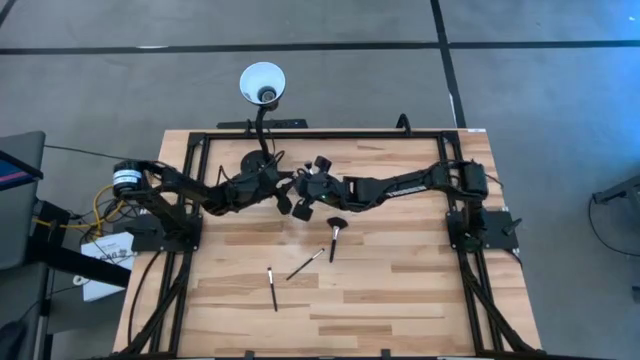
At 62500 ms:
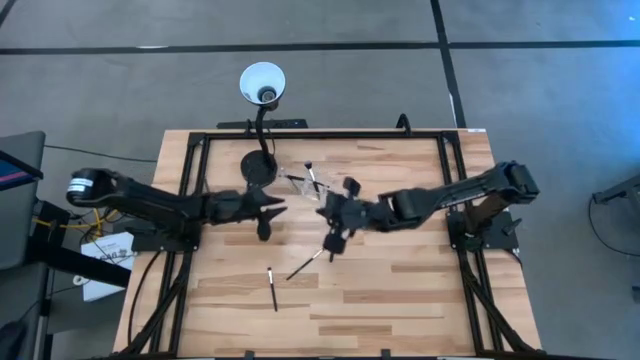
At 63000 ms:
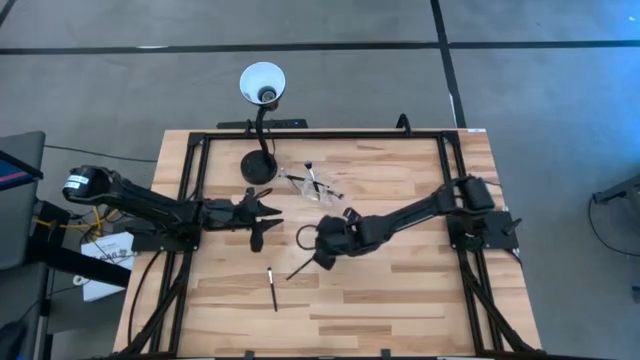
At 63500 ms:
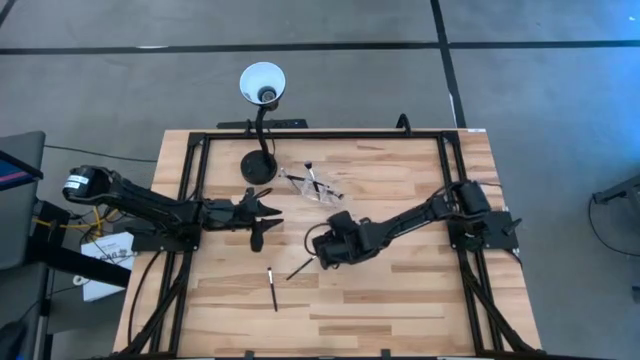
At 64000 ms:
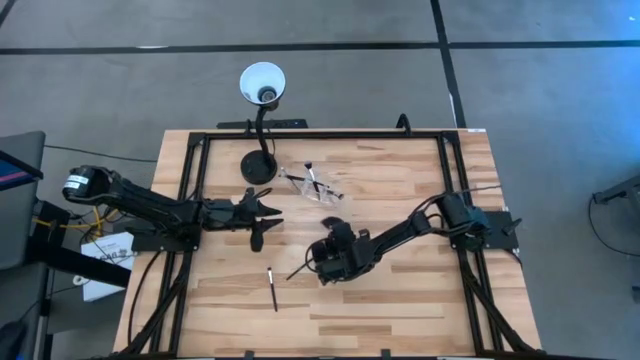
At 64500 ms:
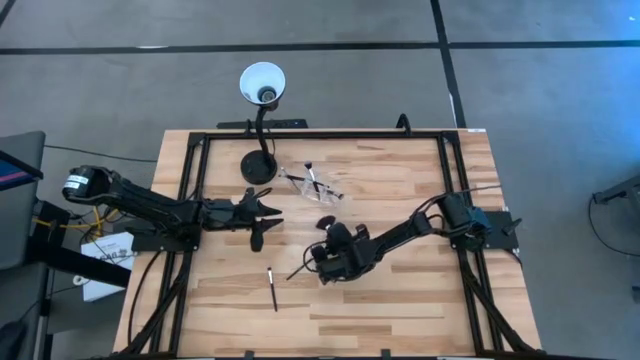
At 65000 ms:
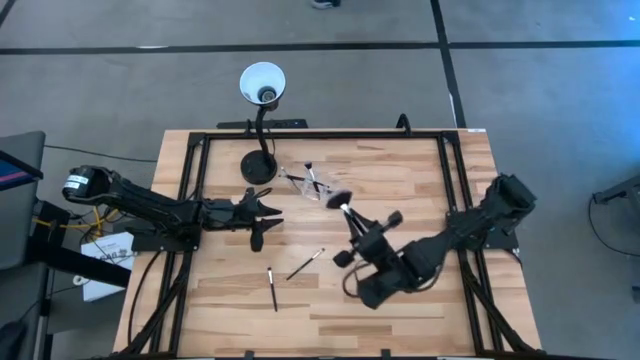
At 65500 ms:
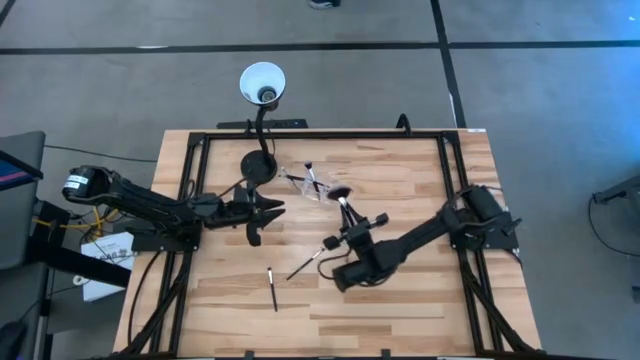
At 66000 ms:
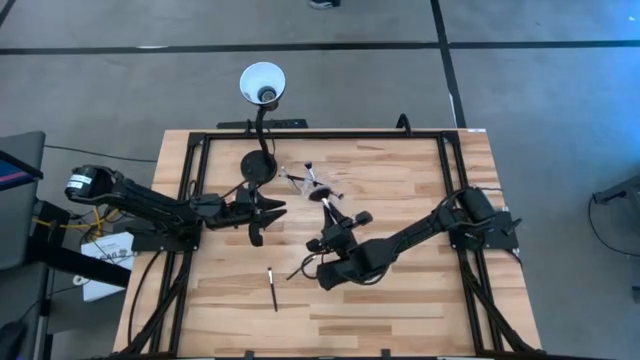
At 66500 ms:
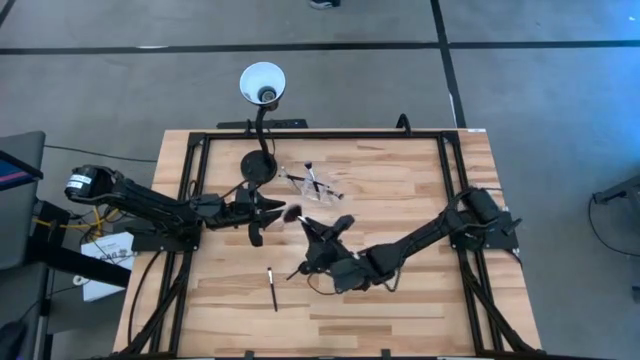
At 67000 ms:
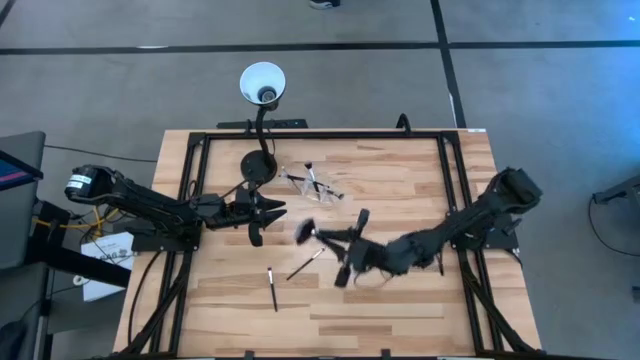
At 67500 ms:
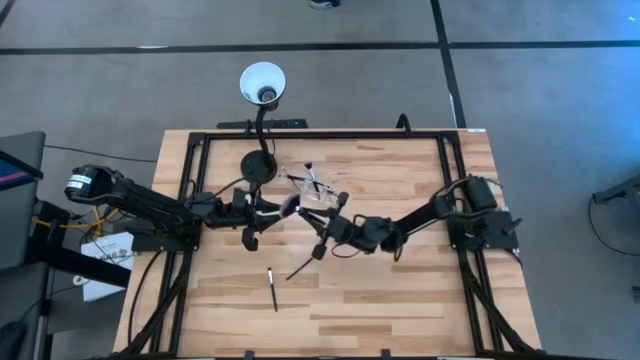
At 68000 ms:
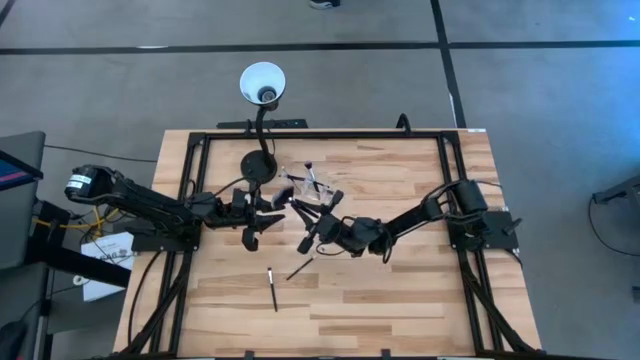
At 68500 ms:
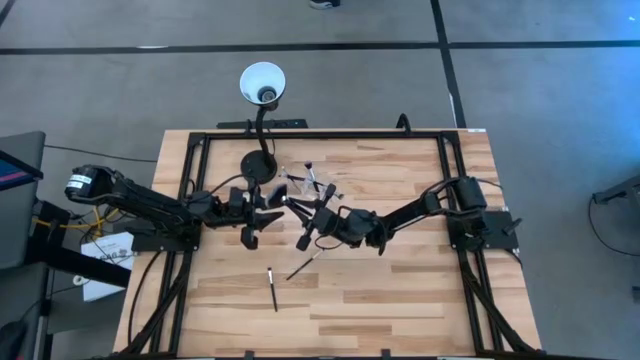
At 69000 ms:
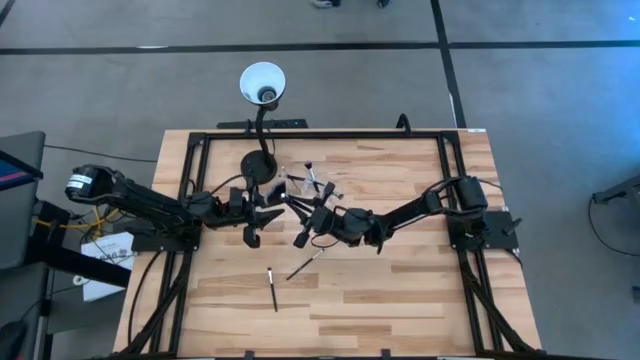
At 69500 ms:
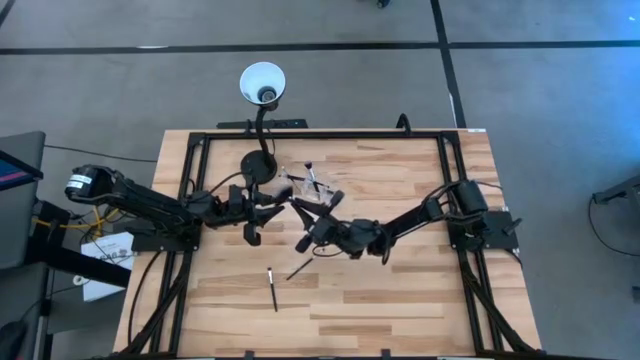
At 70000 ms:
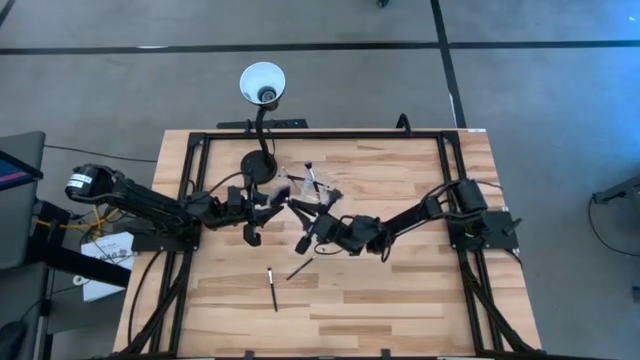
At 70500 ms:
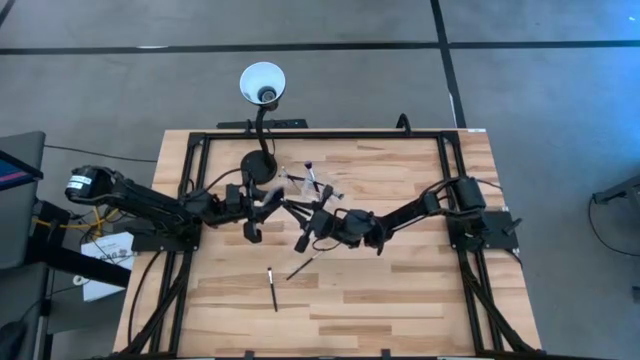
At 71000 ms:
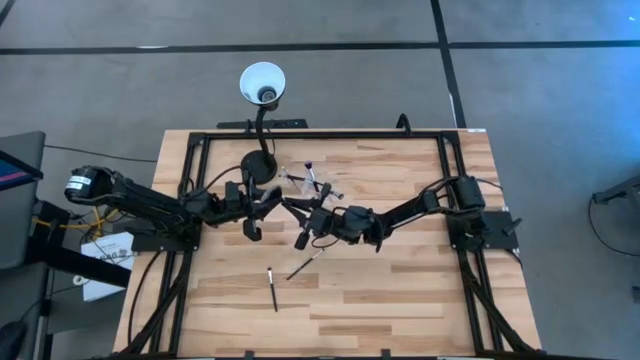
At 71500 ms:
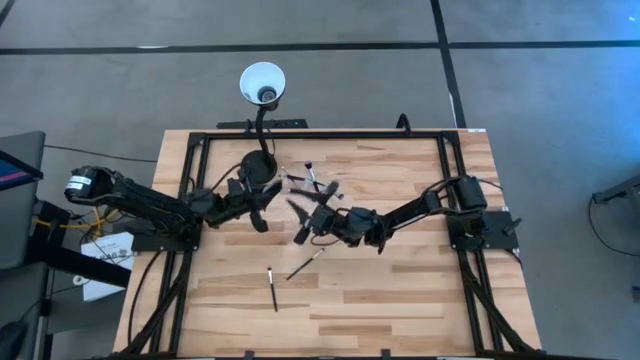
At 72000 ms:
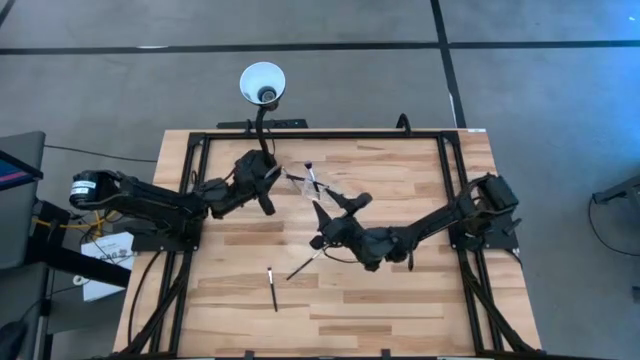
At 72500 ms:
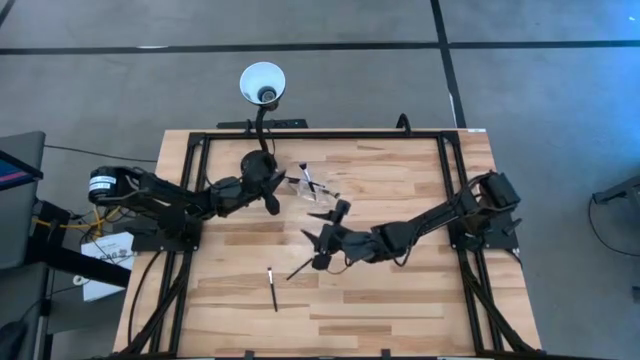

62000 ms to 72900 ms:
Task: Sort items
Put the highlighter brush into the left section of the transparent organizer

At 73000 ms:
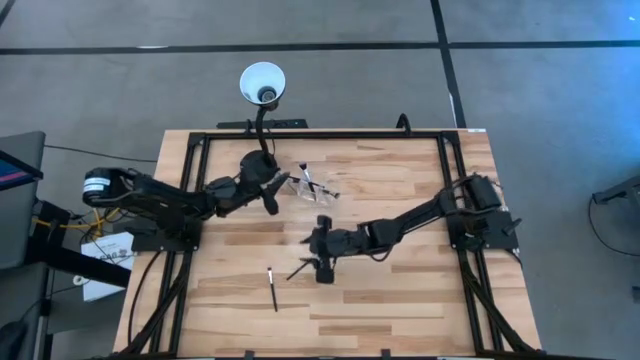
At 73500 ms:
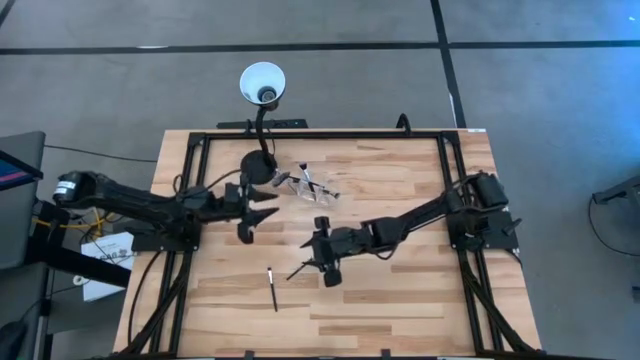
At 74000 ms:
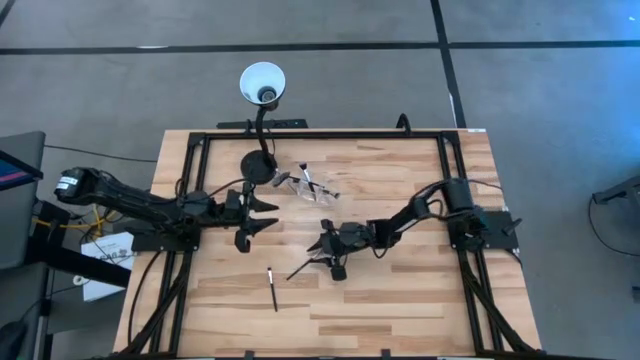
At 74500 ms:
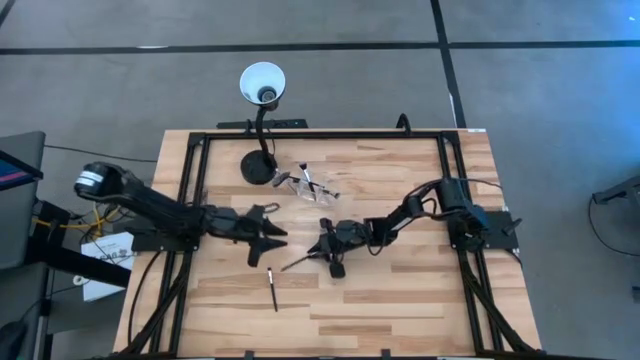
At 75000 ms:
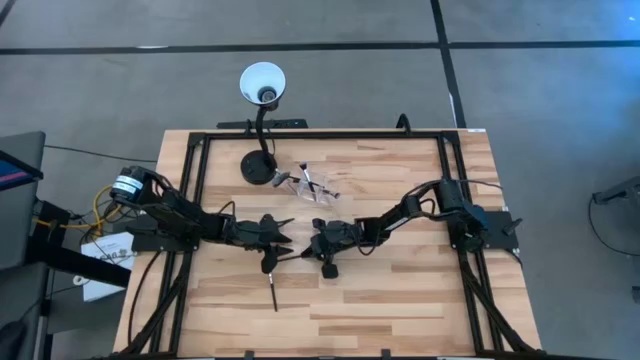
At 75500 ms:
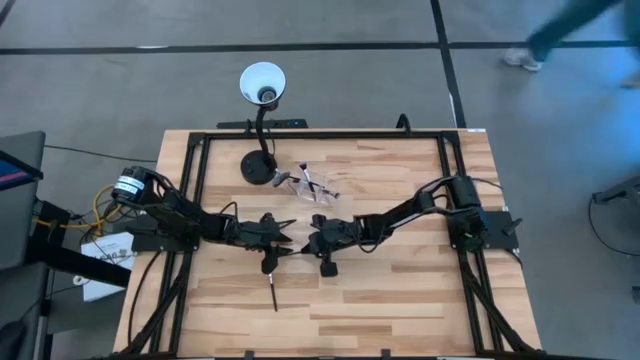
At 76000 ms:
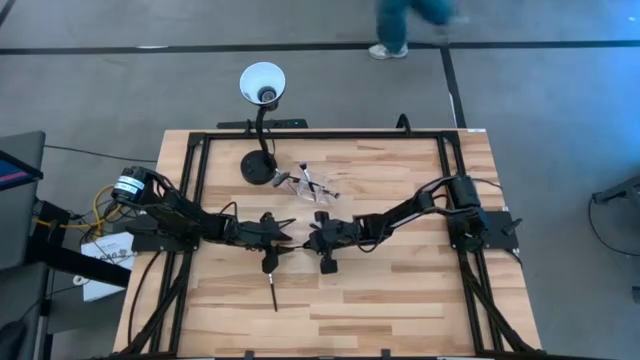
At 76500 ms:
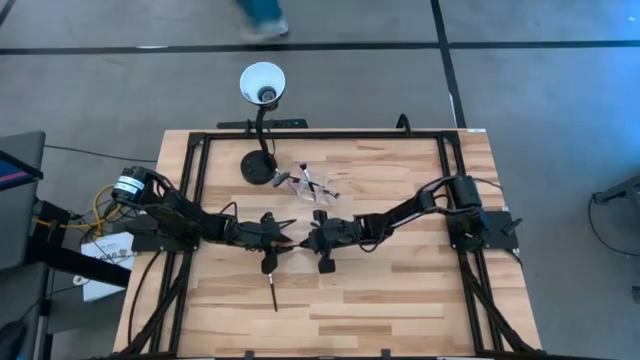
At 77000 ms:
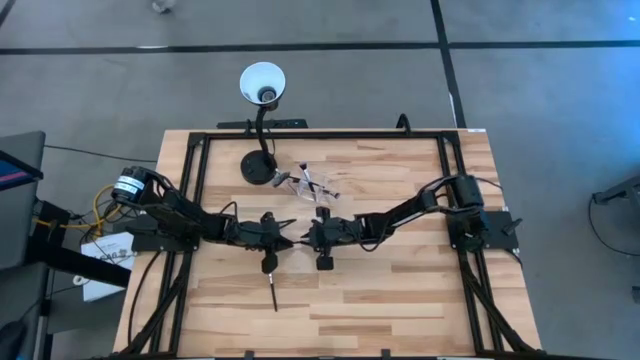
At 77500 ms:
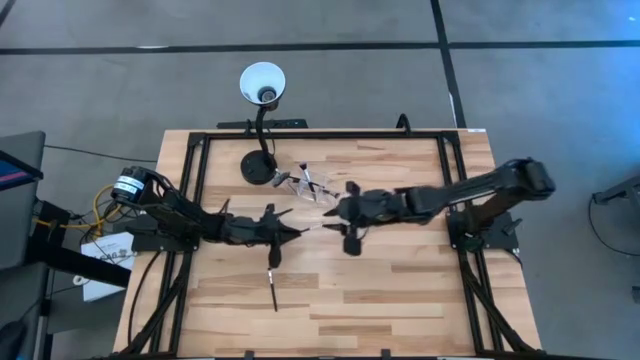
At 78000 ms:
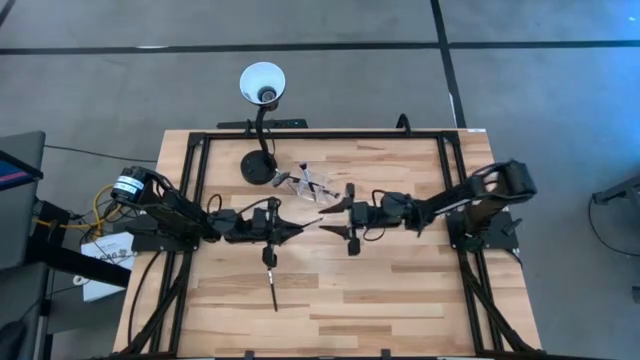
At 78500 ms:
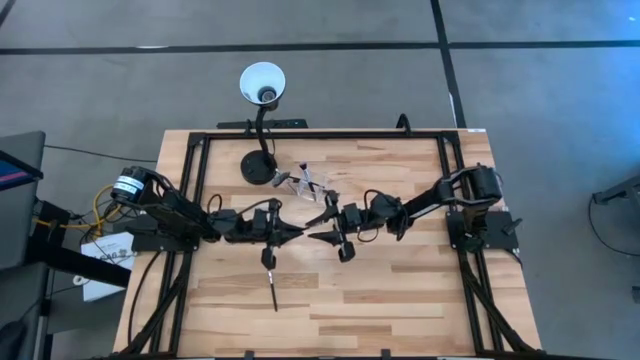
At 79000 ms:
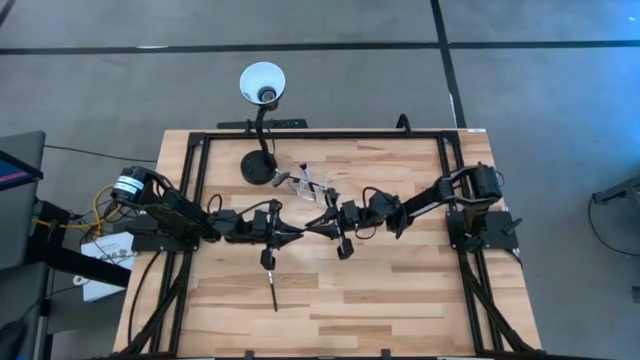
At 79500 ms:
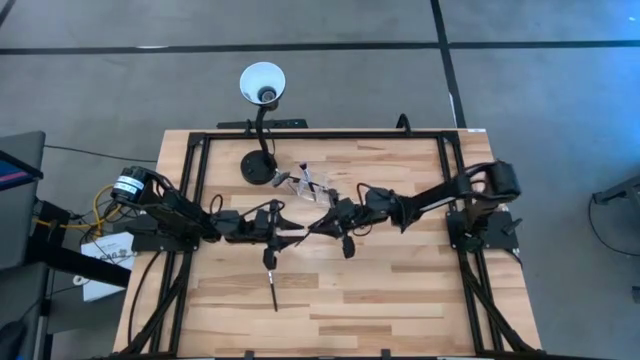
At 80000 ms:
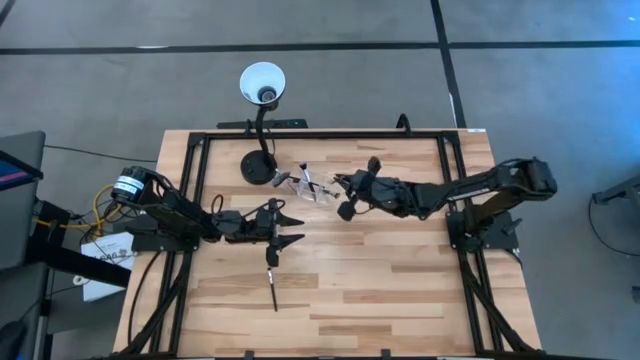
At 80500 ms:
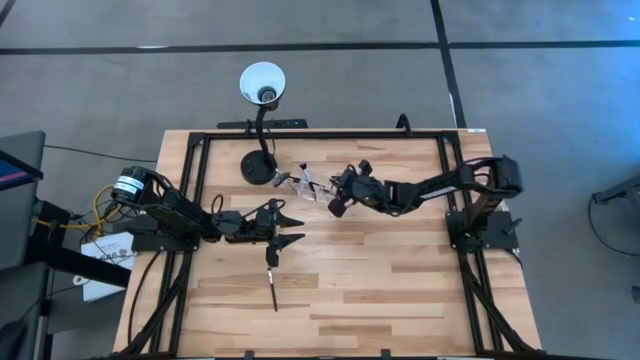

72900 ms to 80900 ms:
Put the eyeshadow brush into the right section of the transparent organizer

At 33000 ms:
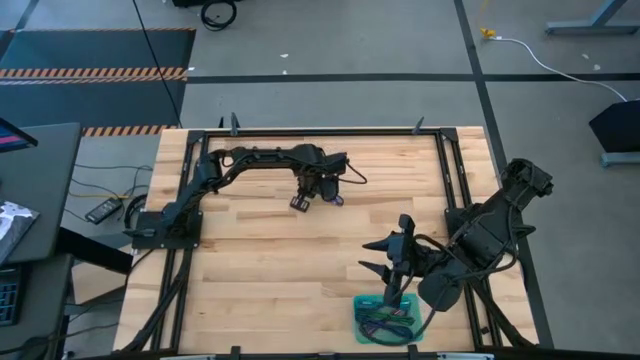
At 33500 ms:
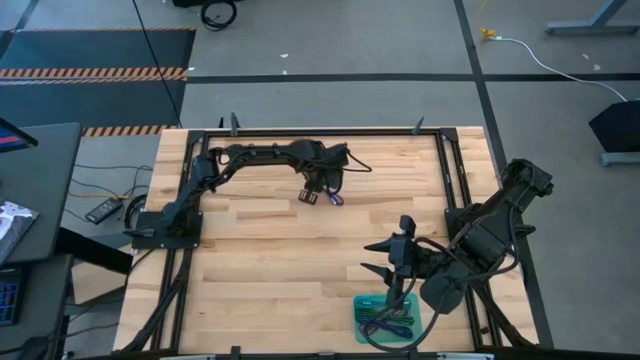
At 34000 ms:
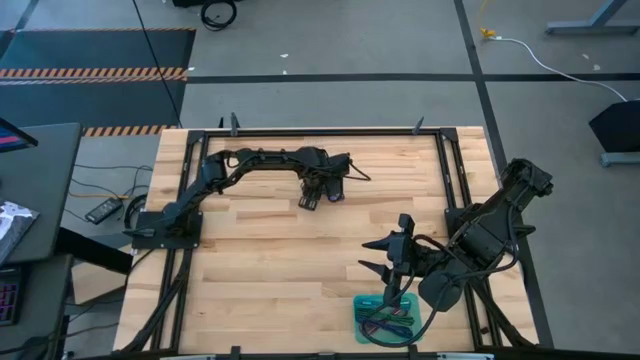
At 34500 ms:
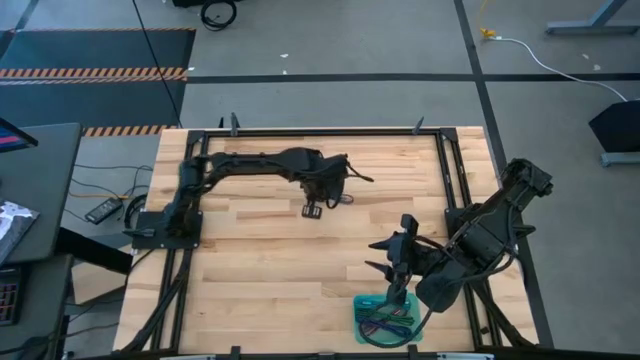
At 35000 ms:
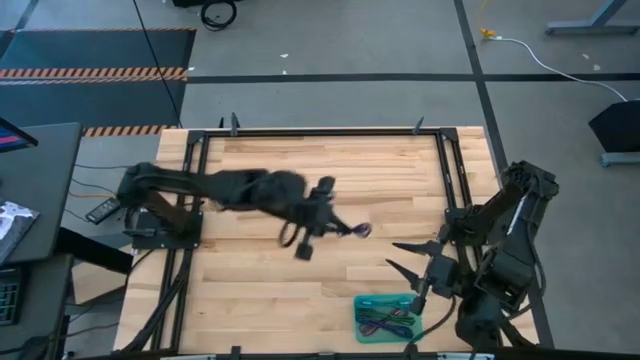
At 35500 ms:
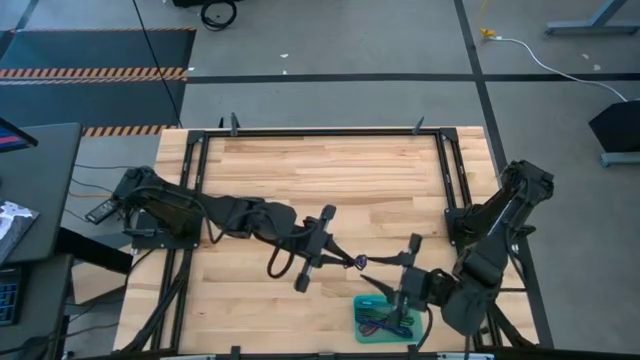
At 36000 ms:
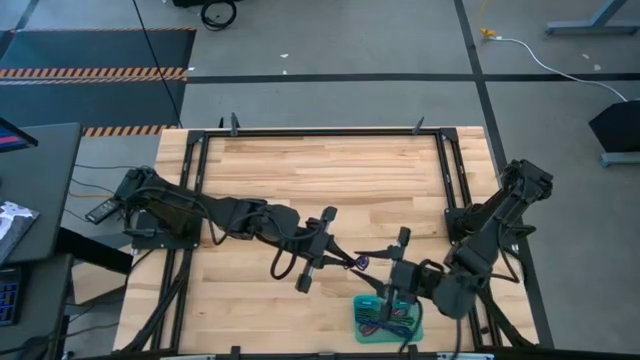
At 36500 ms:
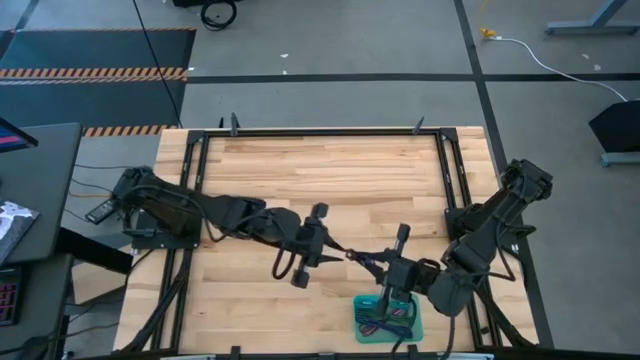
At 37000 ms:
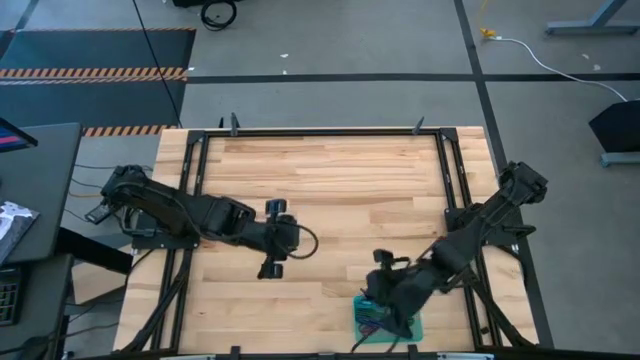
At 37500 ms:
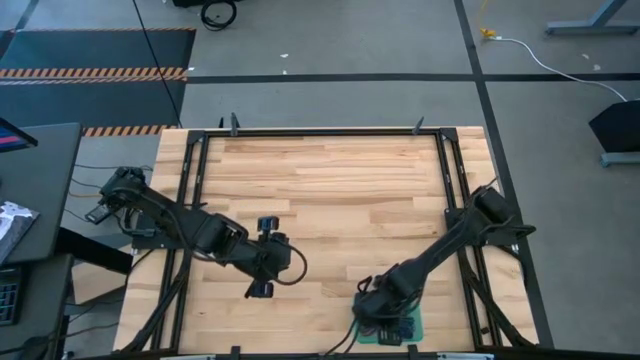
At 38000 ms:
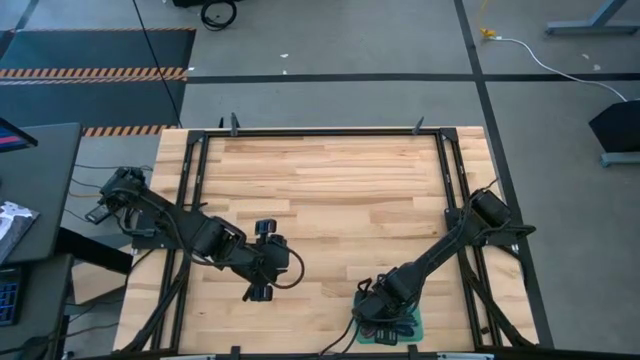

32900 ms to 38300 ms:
Task: Pick and place USB-C Cables
Put the purple charger cable into the blue bin
